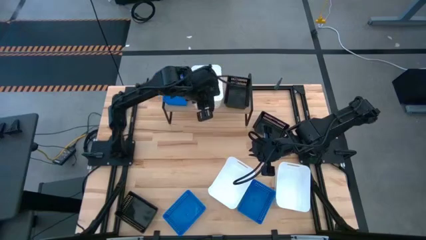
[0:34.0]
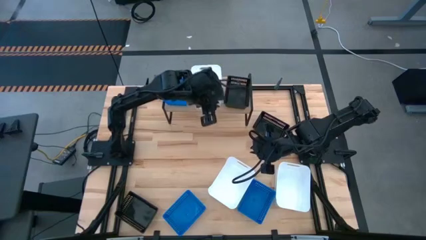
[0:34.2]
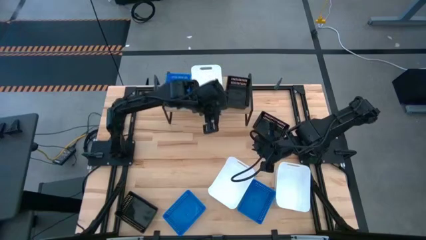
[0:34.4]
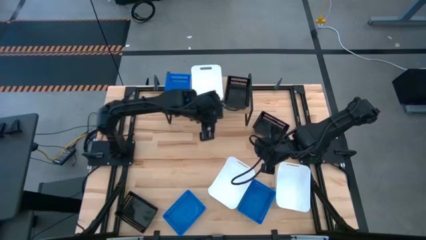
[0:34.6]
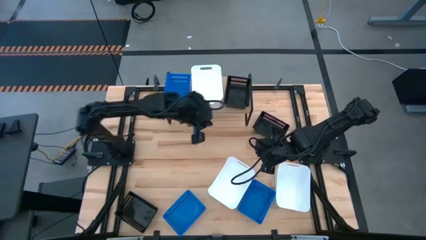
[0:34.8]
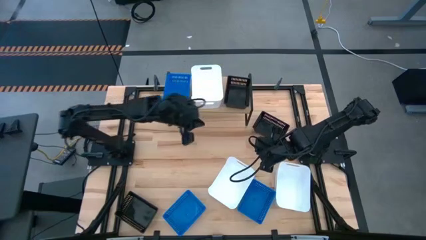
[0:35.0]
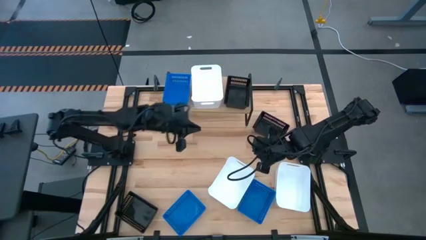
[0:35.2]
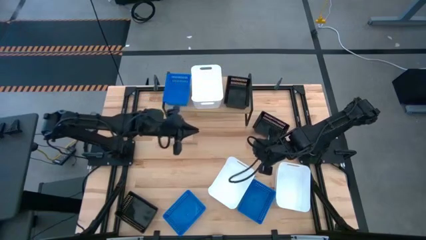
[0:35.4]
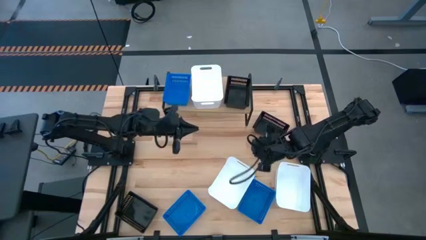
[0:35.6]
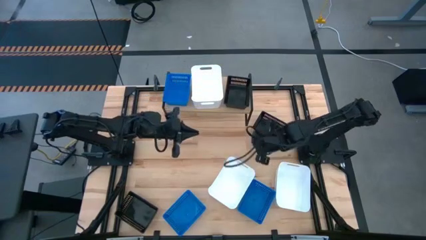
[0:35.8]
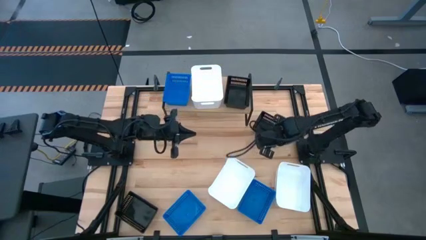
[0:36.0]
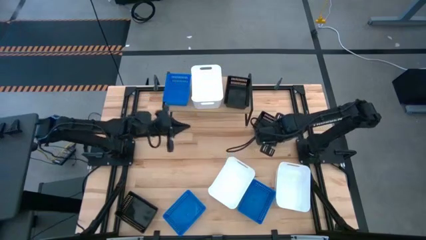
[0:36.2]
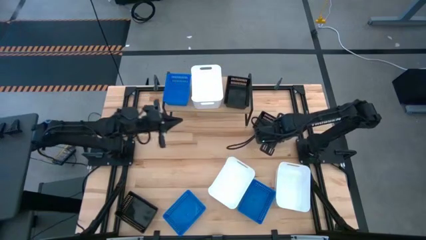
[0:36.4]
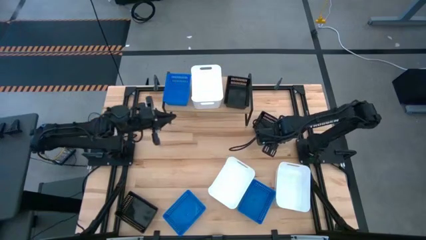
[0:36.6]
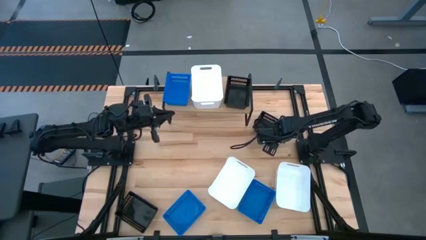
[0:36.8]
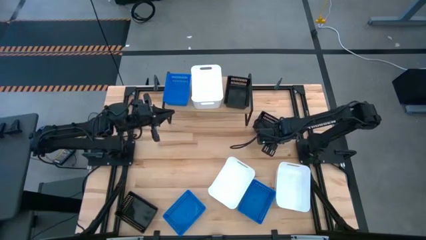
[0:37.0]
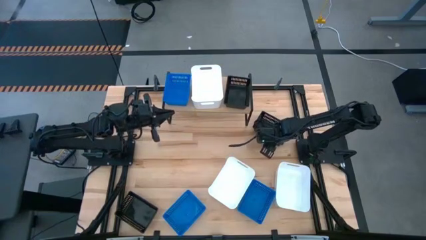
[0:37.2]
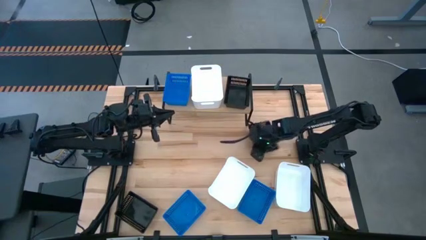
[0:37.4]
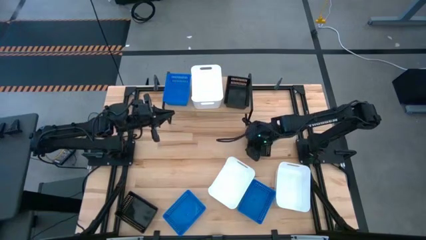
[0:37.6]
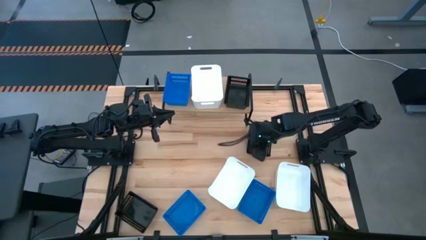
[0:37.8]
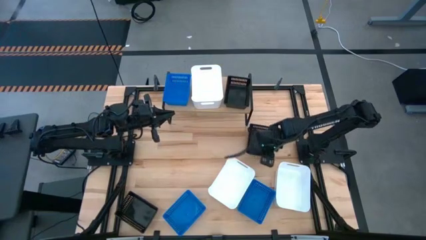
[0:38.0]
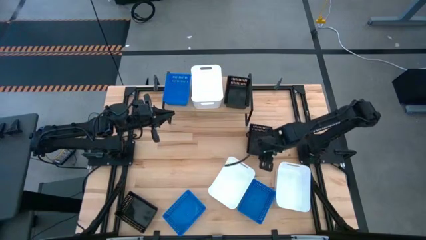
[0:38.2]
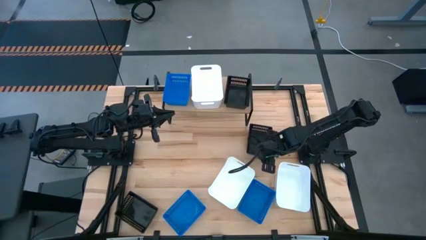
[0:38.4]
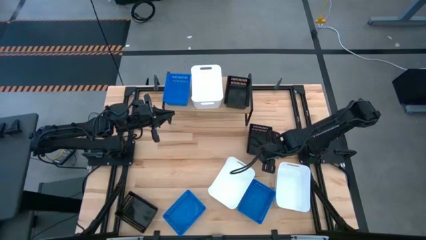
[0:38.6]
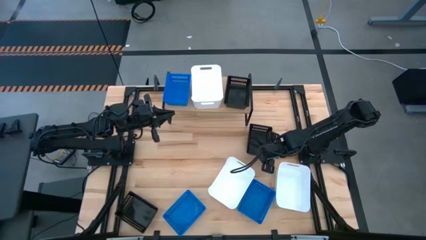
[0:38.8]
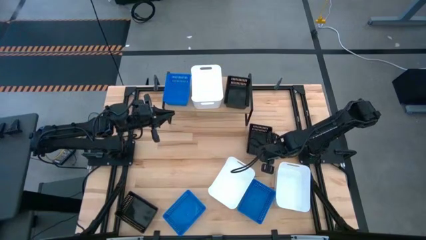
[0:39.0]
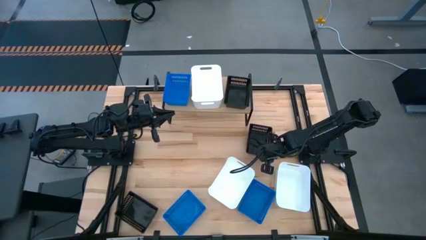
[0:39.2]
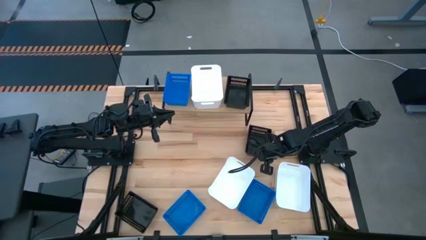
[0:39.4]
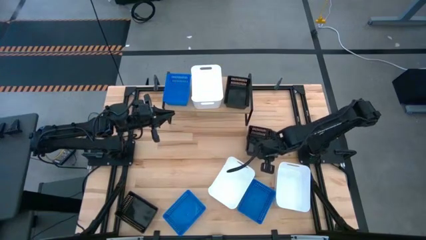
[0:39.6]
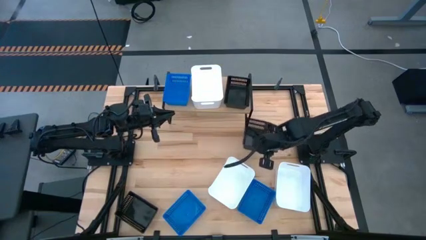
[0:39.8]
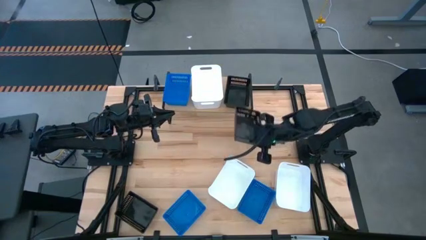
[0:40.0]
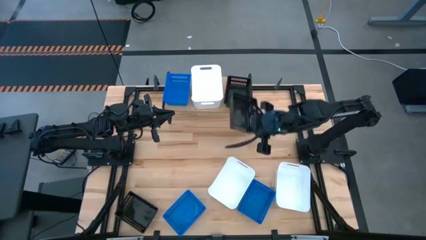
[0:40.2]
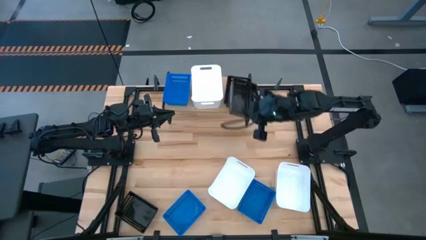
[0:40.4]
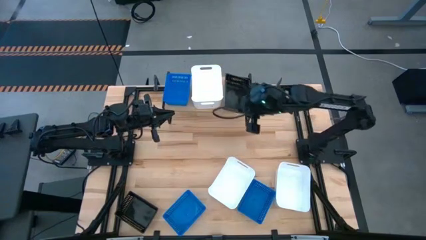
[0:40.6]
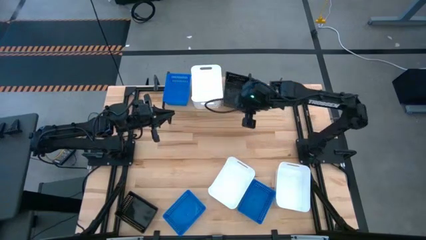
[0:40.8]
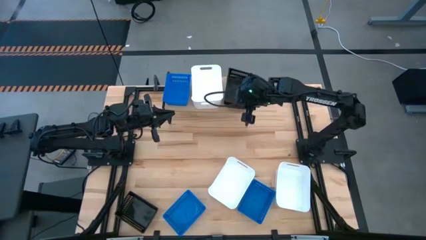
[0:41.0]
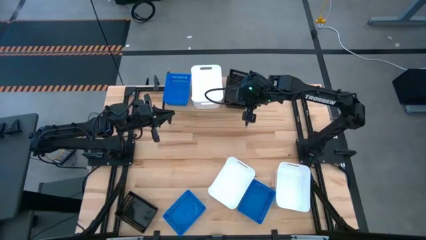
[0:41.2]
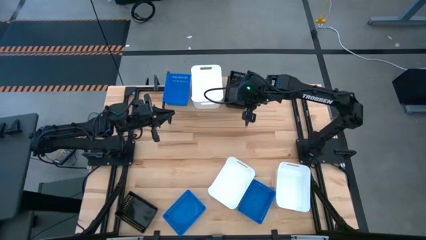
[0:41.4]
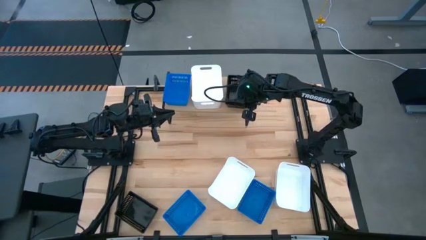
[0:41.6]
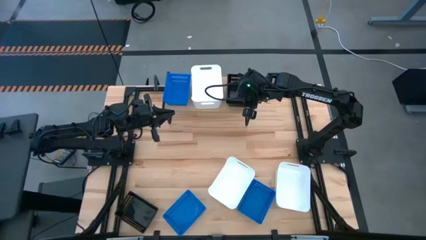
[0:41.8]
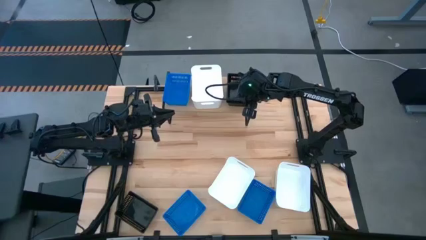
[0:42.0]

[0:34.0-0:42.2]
Task: Stack baskets on shelf by color
Stack the top right black bin into the black bin on the shelf

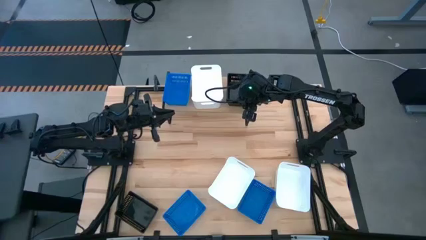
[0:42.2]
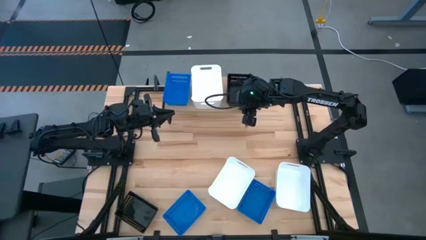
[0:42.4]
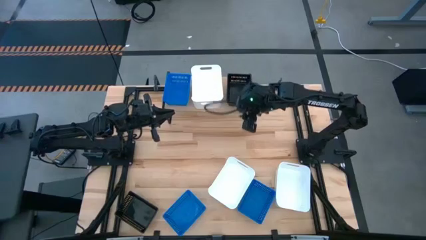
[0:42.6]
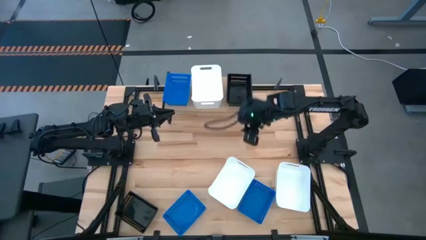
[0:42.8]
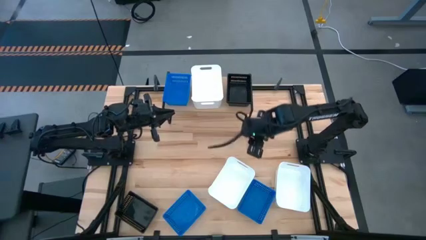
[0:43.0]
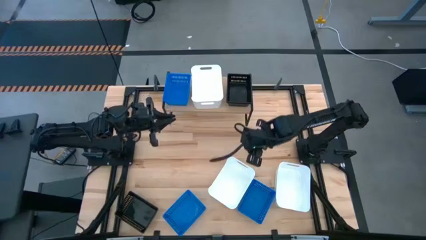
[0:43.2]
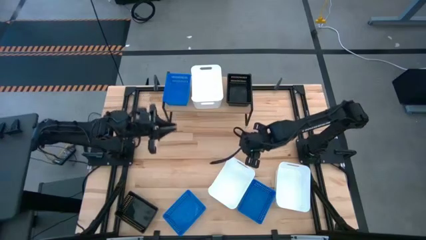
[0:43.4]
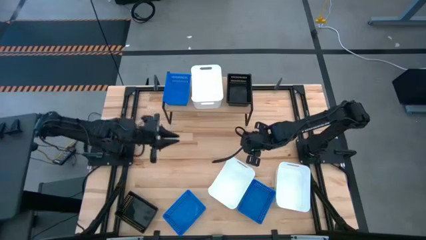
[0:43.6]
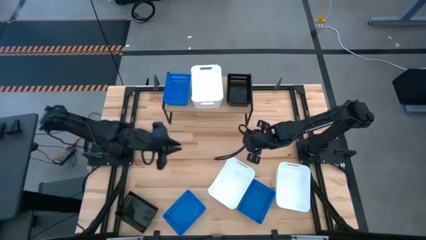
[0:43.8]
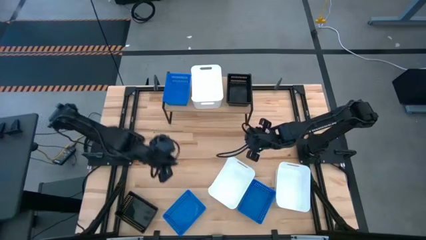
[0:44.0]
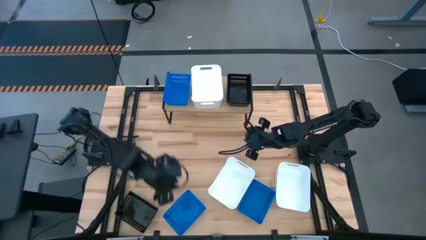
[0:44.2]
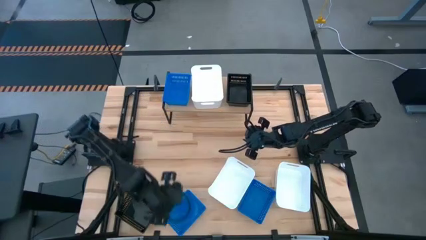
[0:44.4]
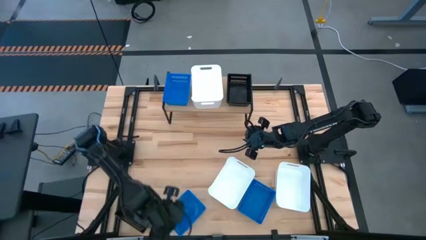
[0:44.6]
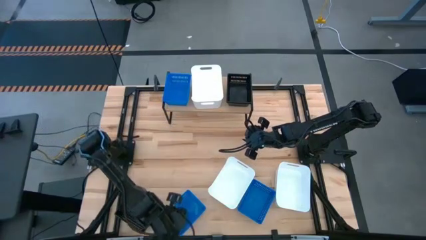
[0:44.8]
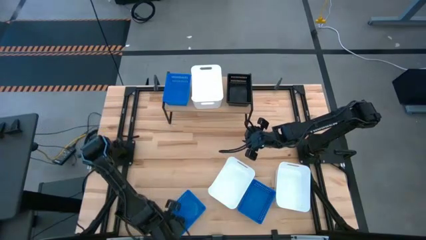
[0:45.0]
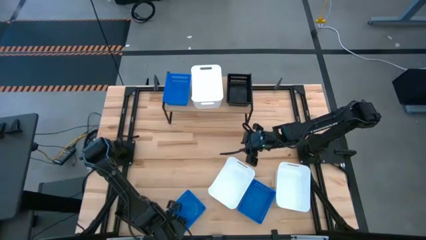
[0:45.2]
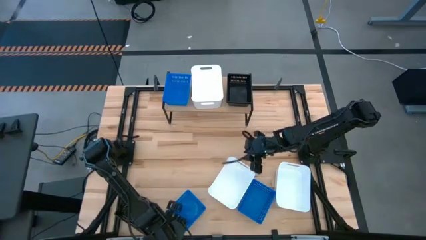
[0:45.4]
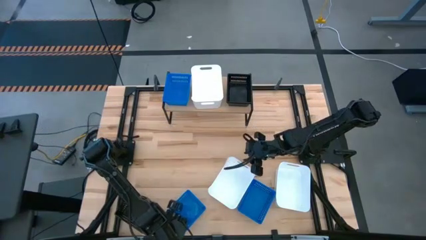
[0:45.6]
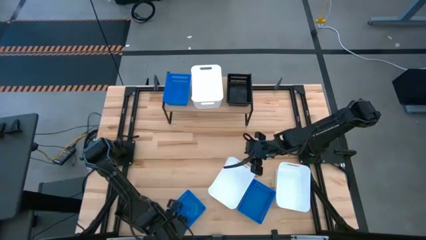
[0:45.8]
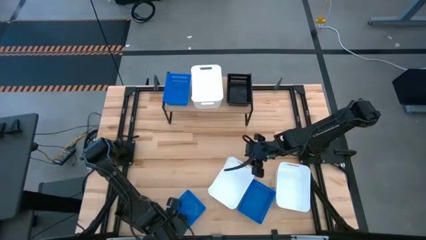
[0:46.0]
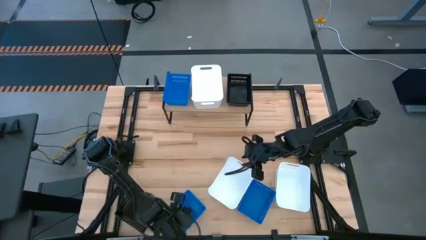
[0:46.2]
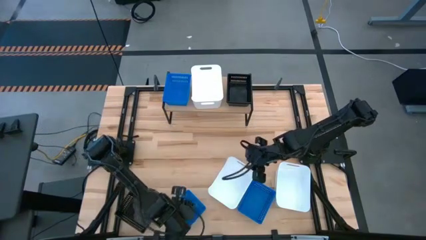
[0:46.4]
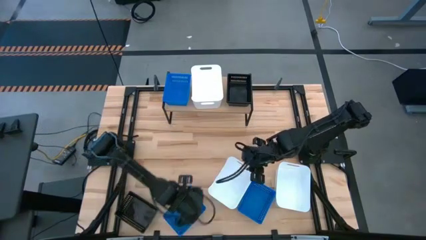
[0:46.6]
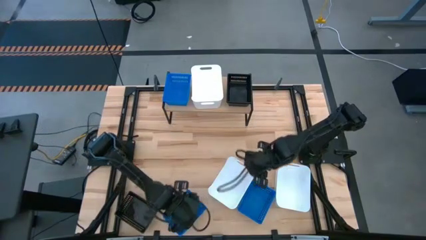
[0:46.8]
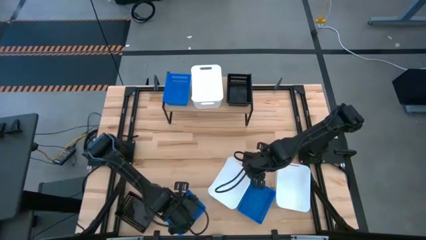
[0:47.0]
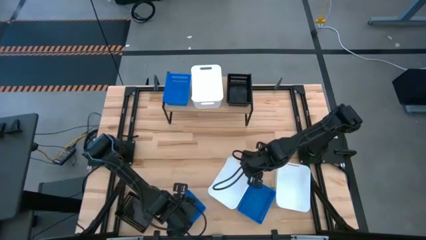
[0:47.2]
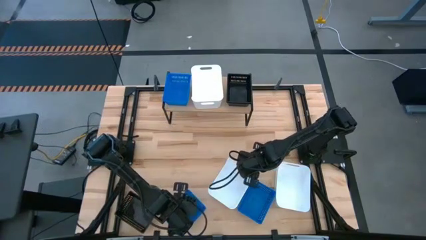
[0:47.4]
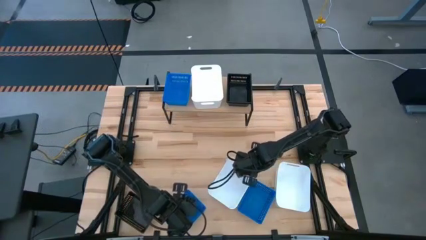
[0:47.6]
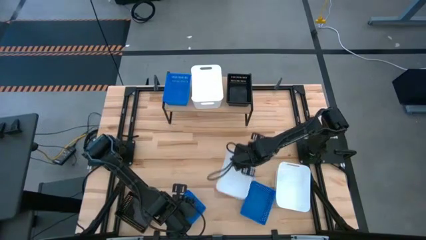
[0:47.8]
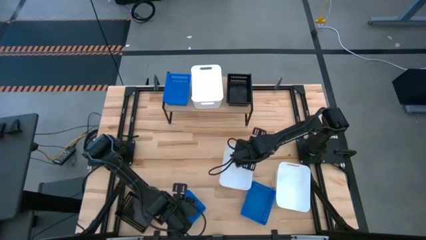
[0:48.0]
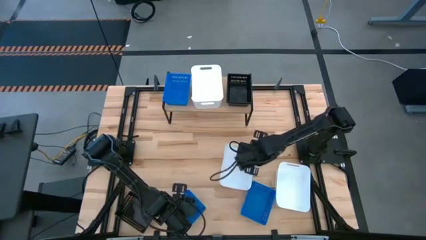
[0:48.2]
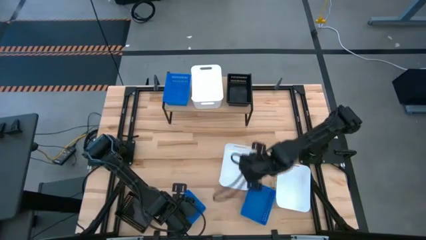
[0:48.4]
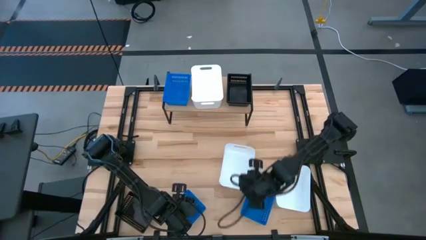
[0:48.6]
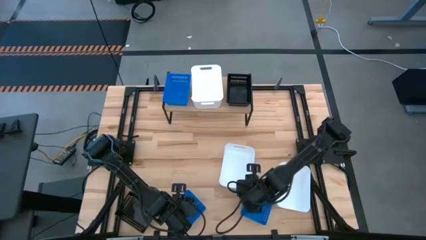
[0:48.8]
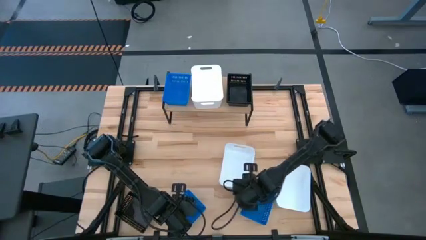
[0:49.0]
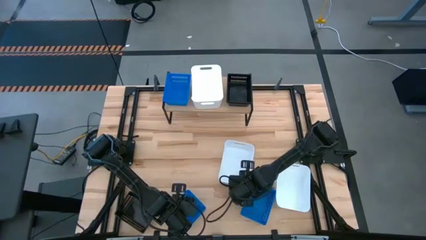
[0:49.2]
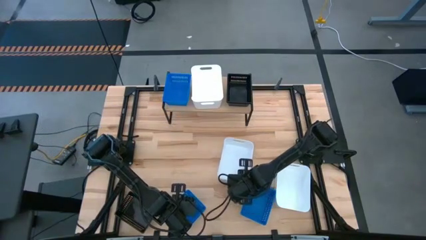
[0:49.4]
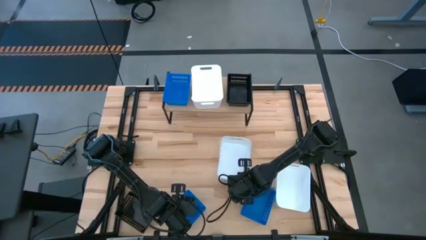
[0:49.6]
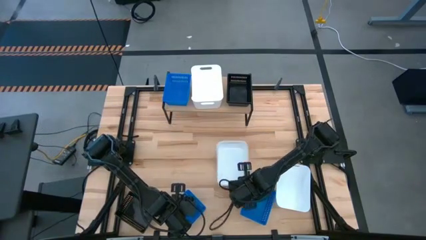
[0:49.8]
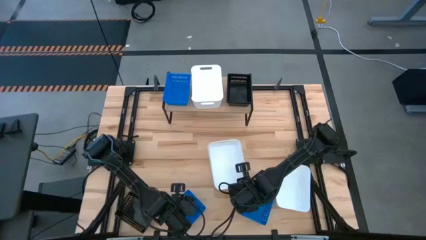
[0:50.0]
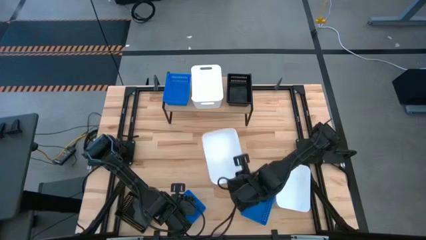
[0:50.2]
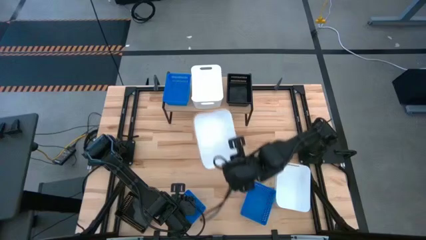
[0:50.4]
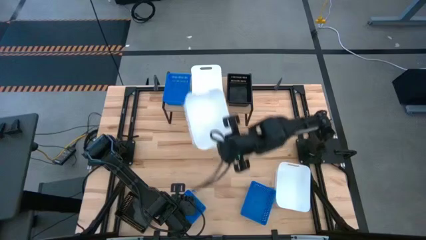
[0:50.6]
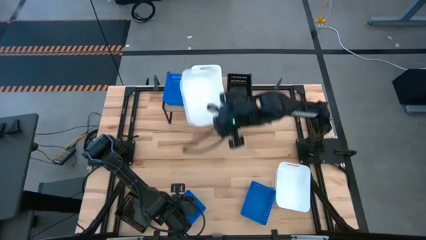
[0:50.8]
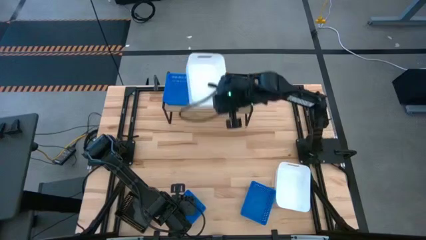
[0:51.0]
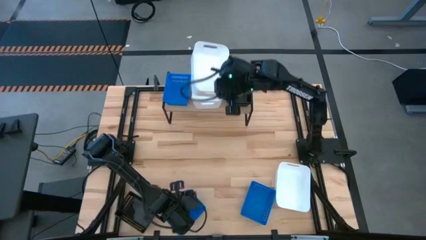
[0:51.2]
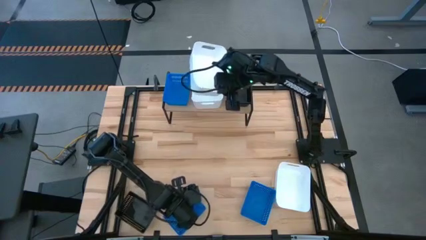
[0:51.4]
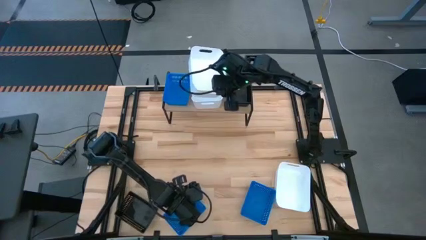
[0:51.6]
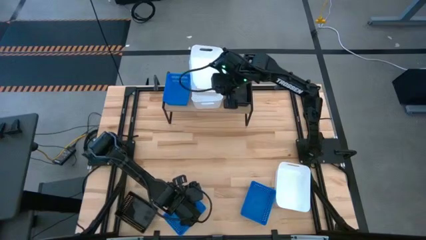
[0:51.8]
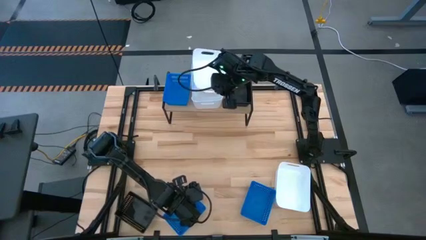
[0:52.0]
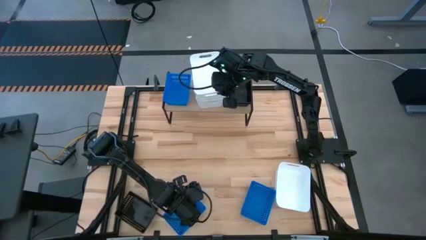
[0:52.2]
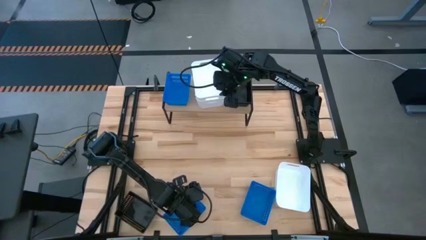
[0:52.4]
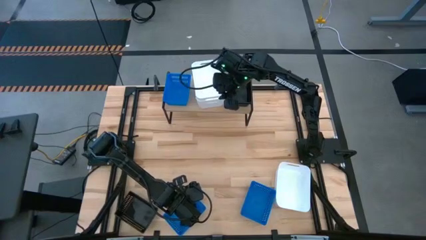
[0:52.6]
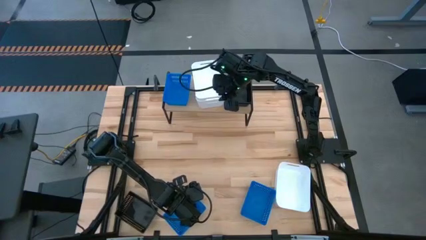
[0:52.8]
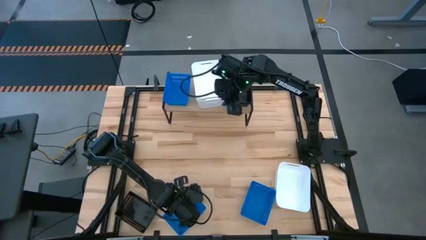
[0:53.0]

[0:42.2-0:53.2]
Stack the center white bin into the white bin on the shelf
